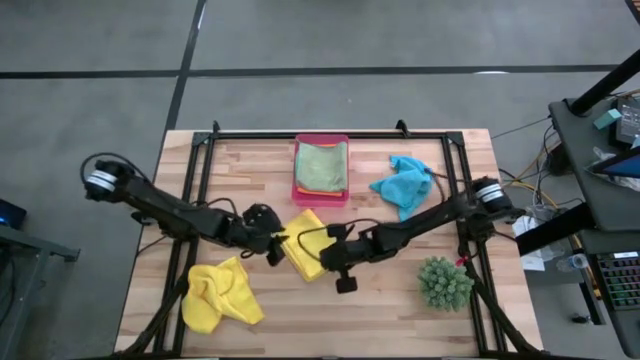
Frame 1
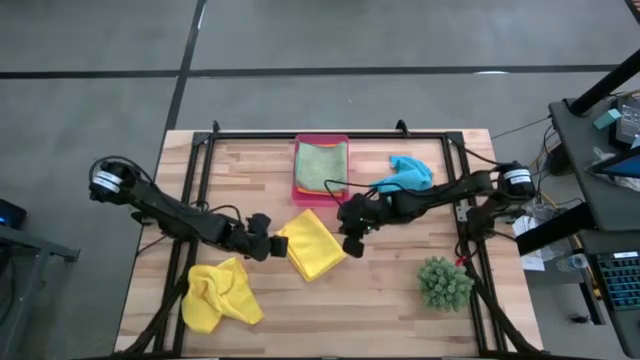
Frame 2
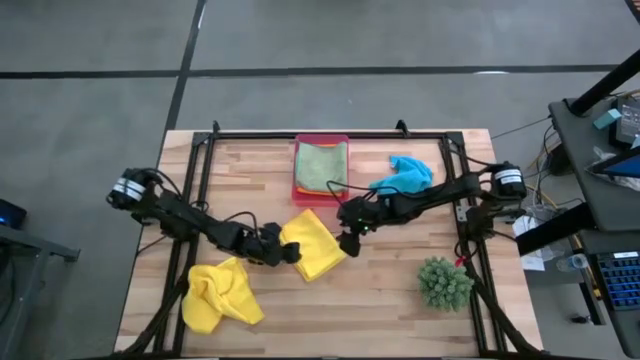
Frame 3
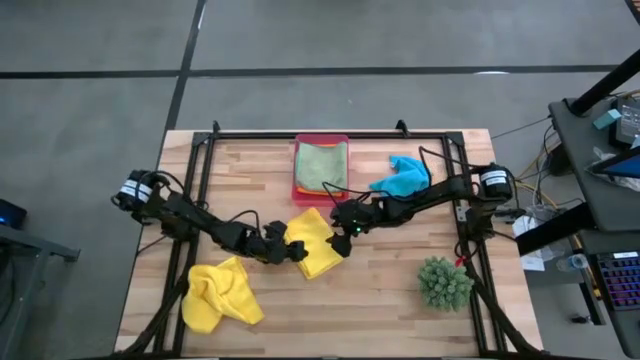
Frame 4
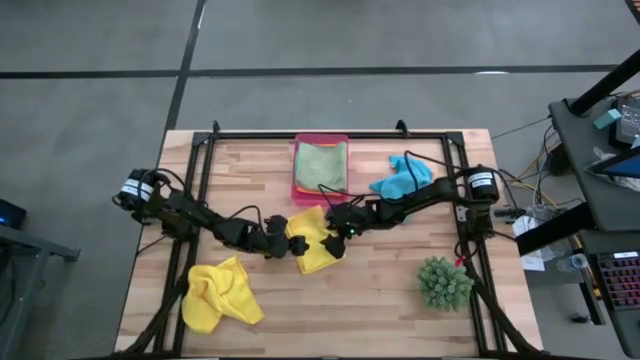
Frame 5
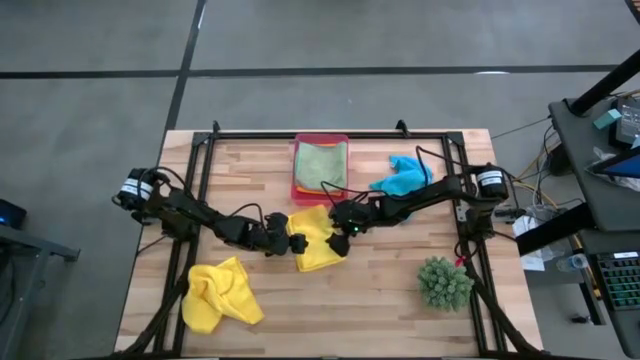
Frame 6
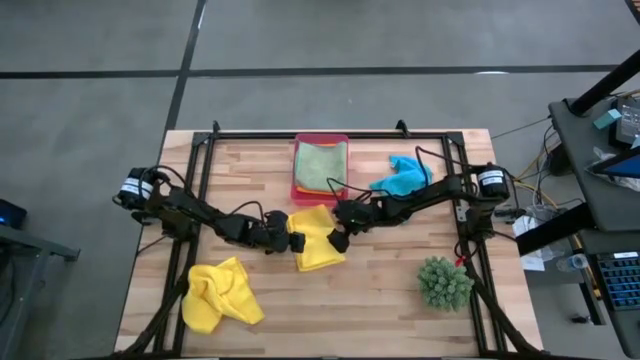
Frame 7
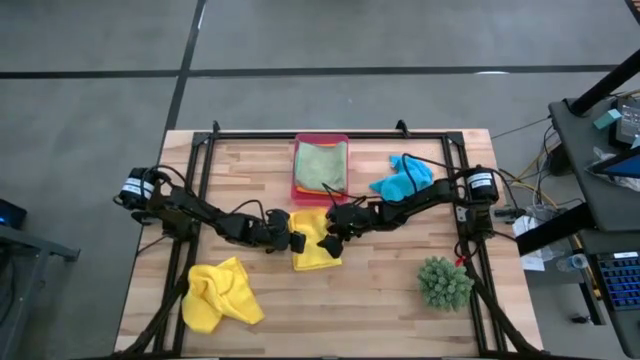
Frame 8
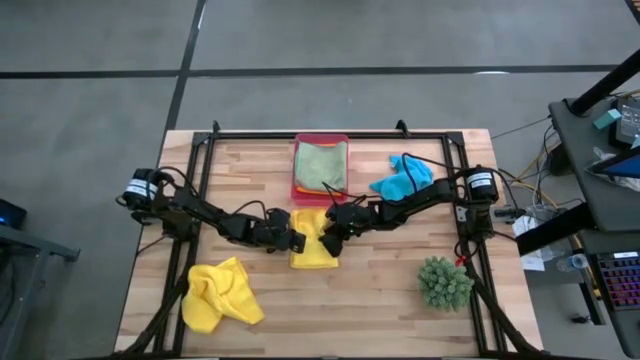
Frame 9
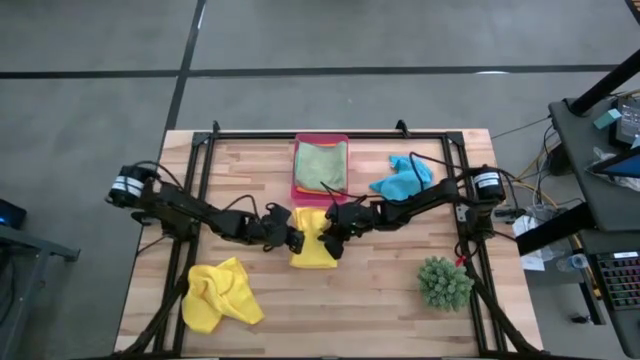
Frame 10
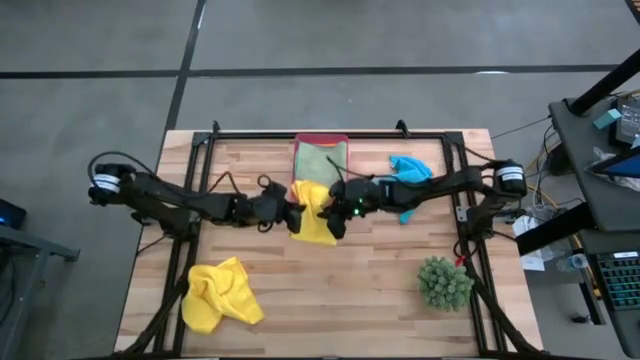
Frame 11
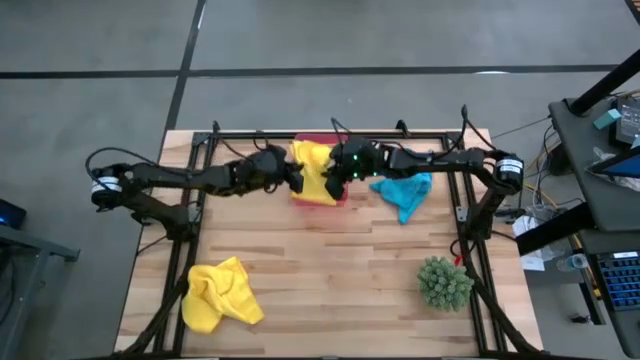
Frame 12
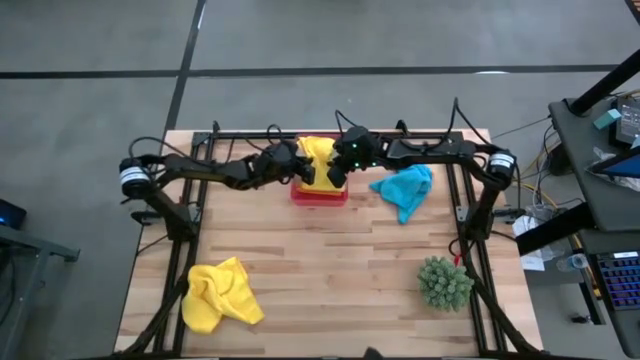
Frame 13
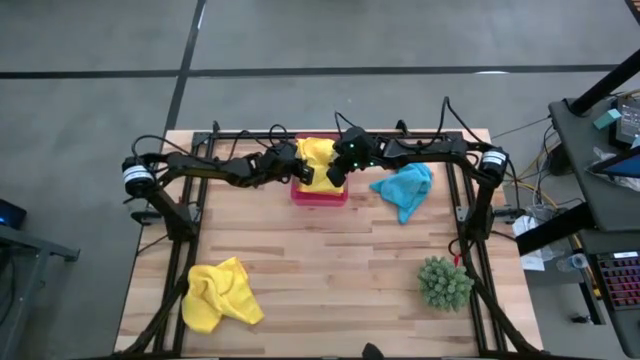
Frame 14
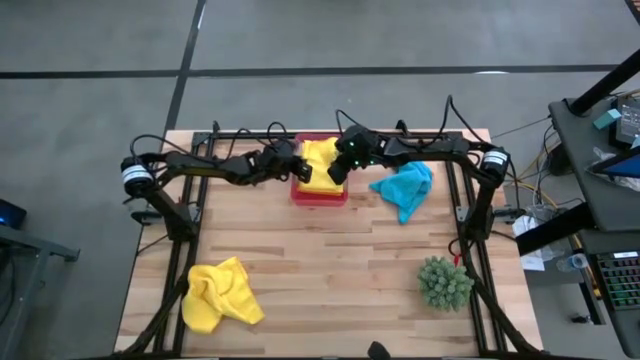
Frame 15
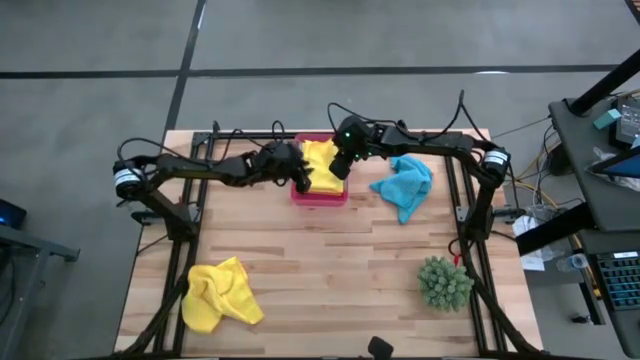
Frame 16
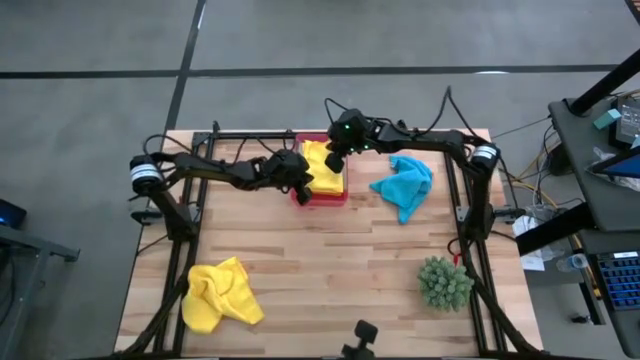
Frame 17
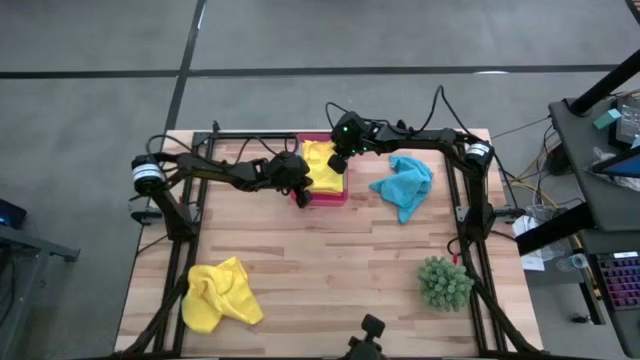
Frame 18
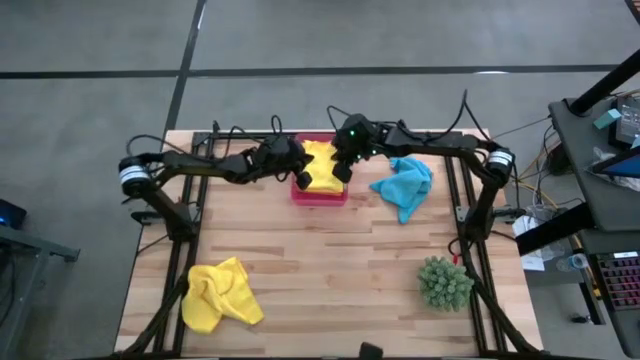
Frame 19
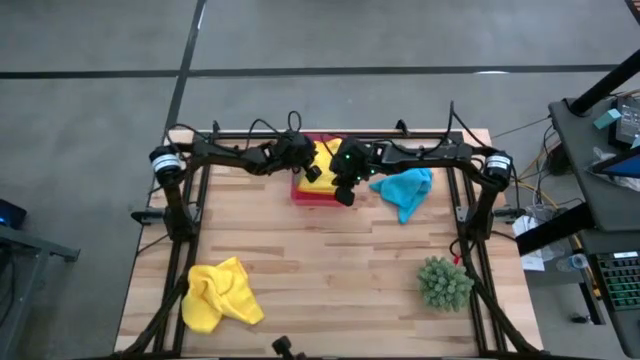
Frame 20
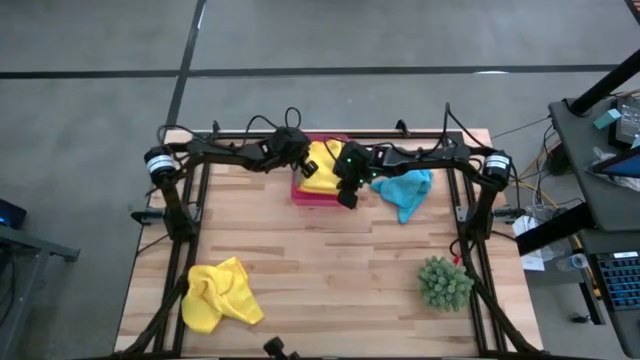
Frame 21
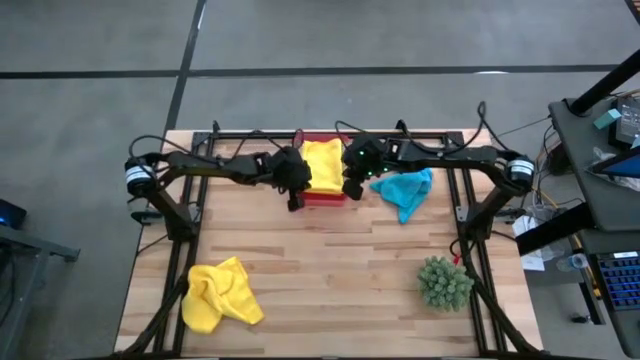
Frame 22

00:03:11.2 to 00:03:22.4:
Task: Fold microfiber towels
Put the top yellow towel into the bin
